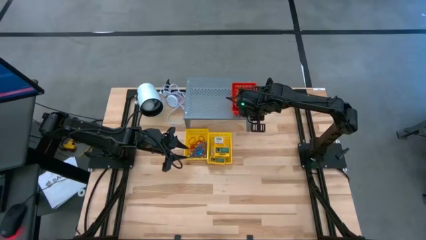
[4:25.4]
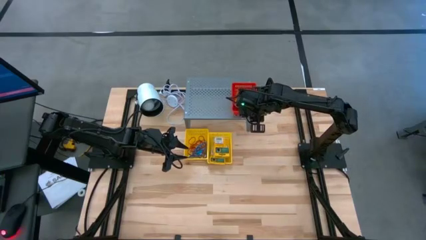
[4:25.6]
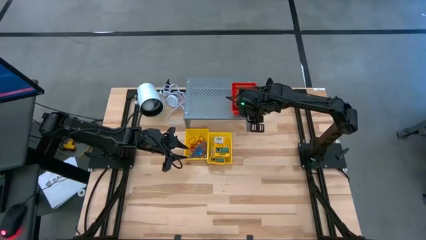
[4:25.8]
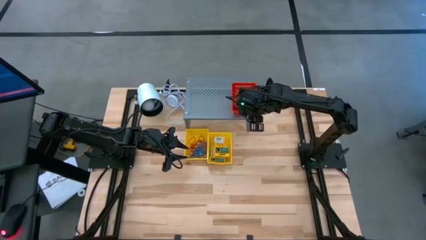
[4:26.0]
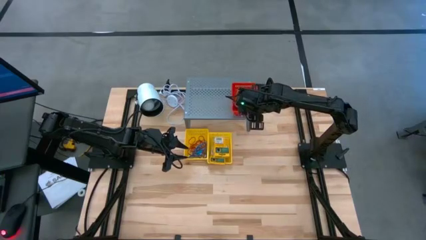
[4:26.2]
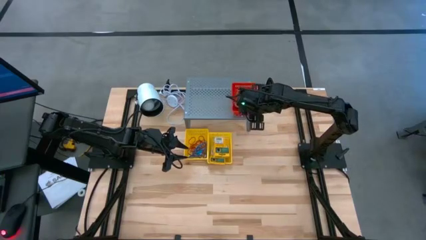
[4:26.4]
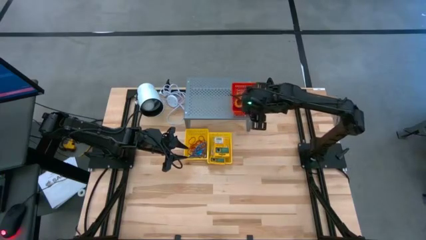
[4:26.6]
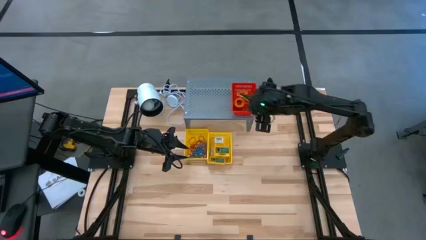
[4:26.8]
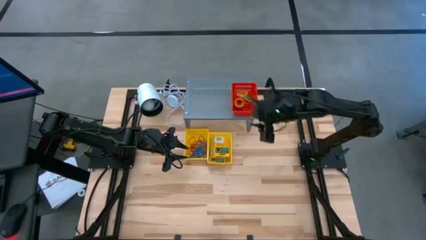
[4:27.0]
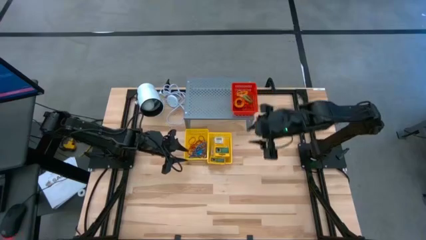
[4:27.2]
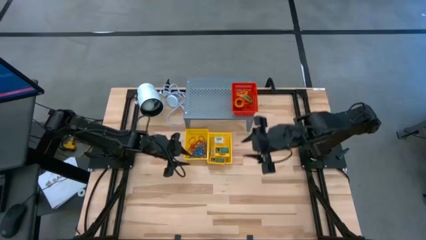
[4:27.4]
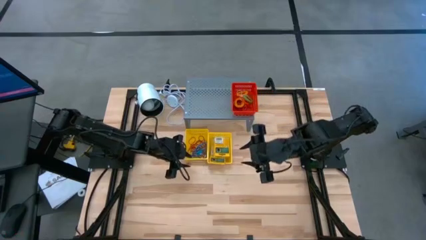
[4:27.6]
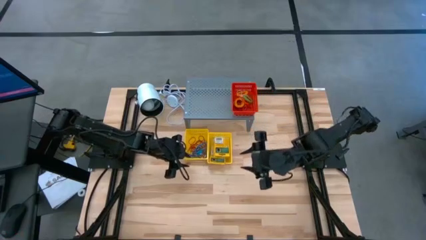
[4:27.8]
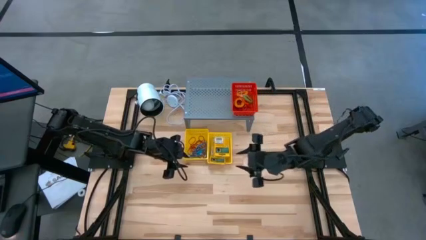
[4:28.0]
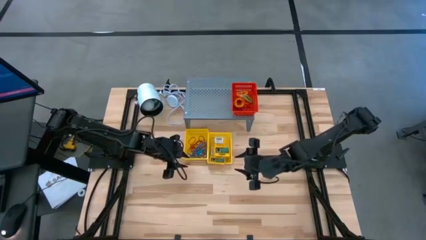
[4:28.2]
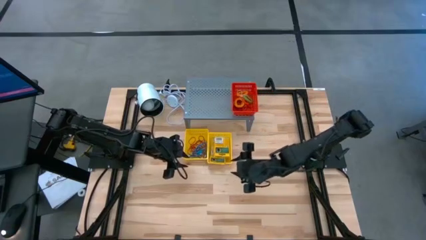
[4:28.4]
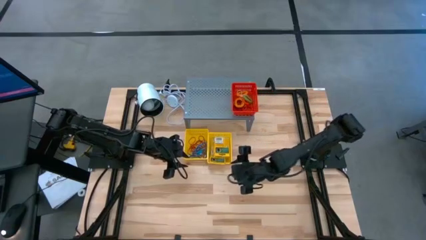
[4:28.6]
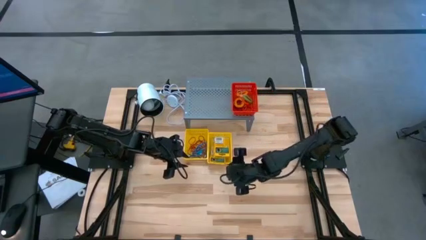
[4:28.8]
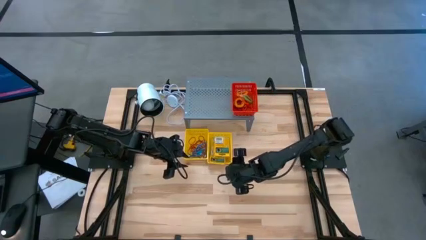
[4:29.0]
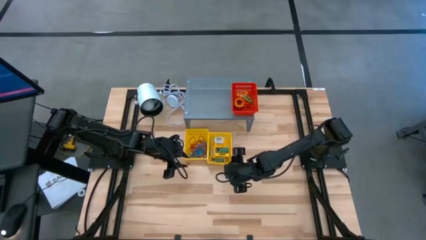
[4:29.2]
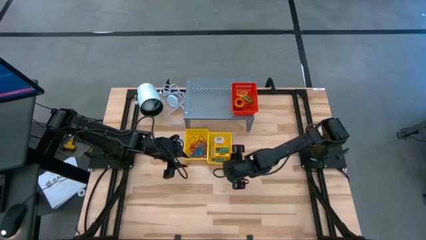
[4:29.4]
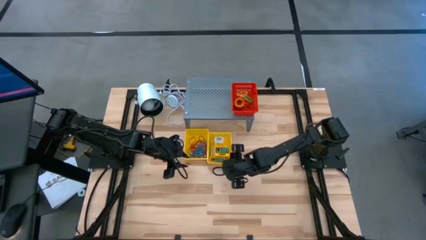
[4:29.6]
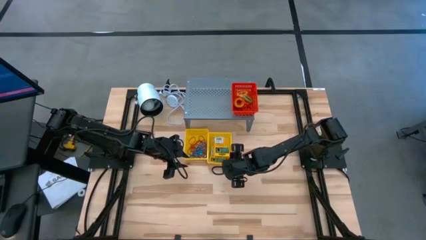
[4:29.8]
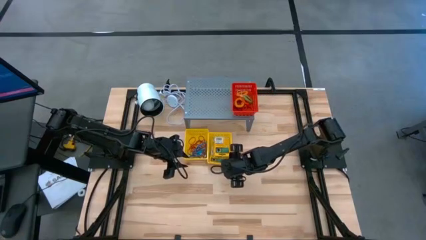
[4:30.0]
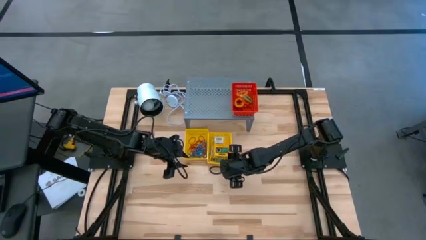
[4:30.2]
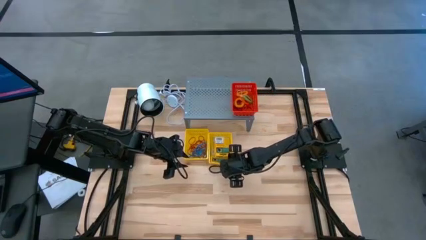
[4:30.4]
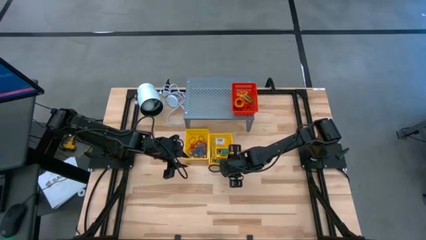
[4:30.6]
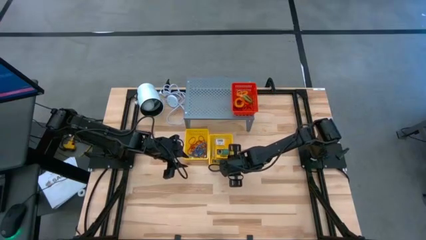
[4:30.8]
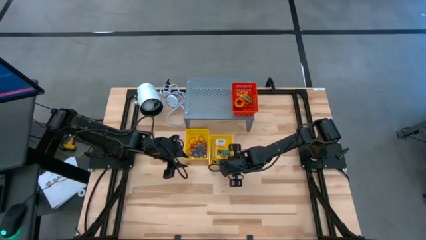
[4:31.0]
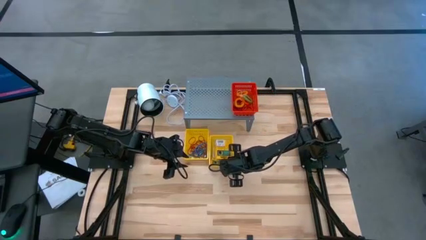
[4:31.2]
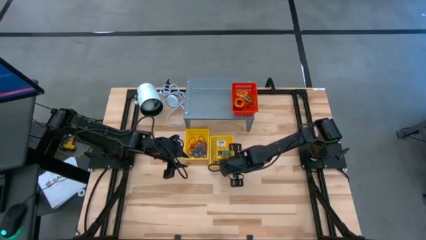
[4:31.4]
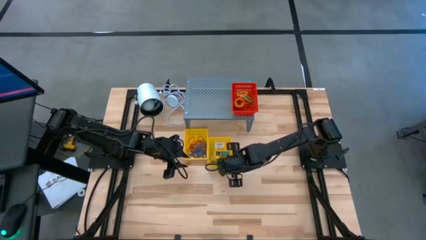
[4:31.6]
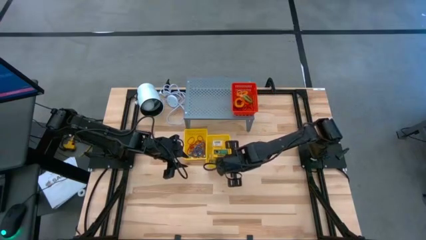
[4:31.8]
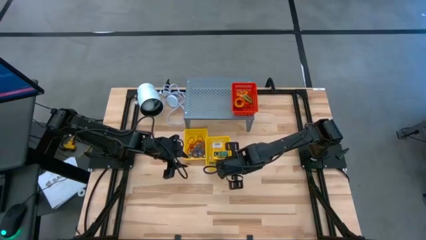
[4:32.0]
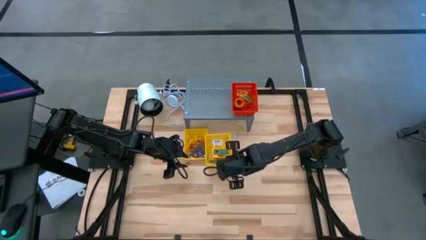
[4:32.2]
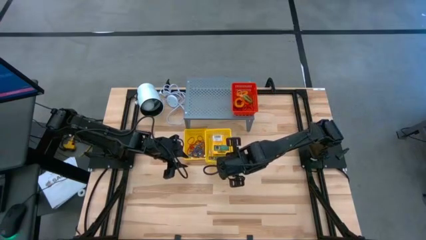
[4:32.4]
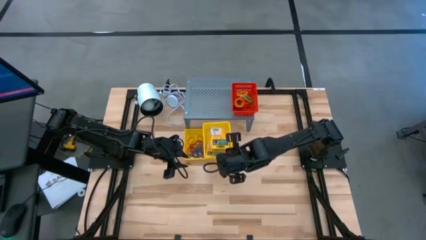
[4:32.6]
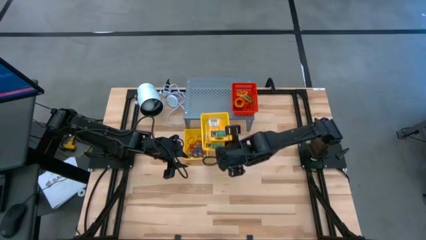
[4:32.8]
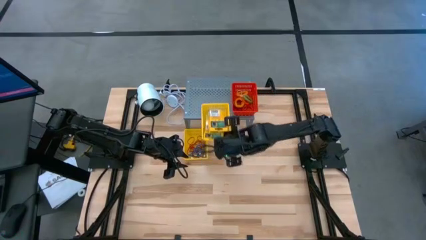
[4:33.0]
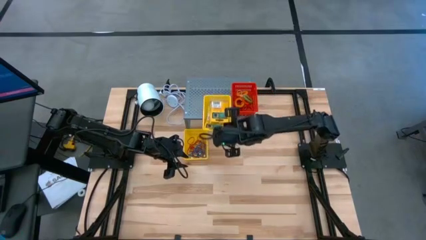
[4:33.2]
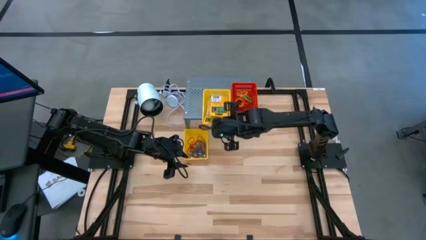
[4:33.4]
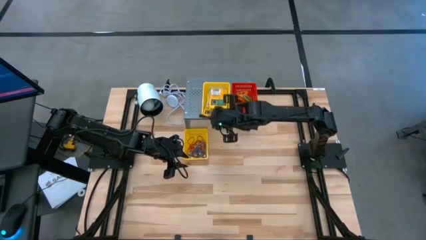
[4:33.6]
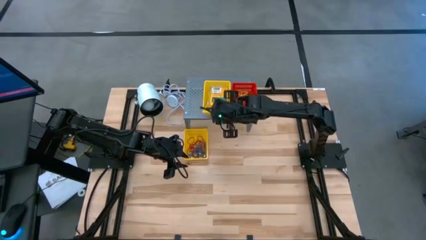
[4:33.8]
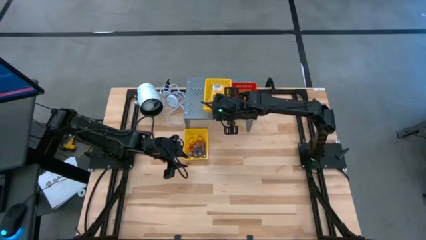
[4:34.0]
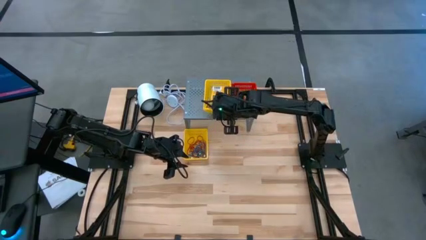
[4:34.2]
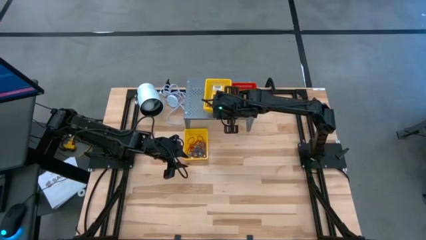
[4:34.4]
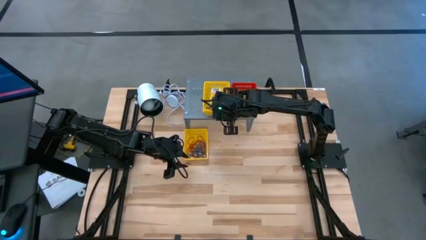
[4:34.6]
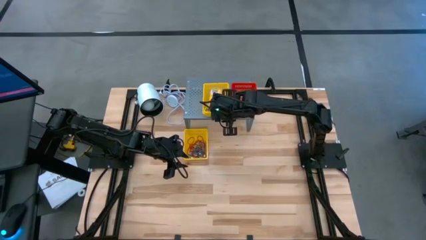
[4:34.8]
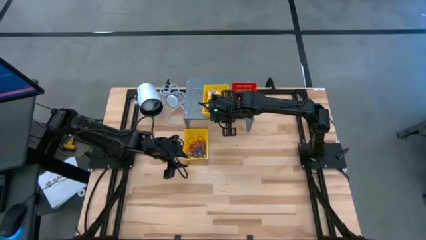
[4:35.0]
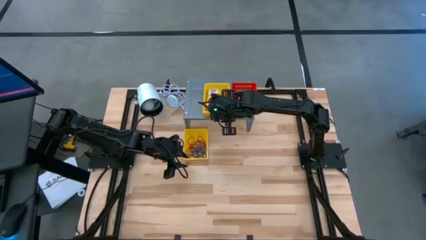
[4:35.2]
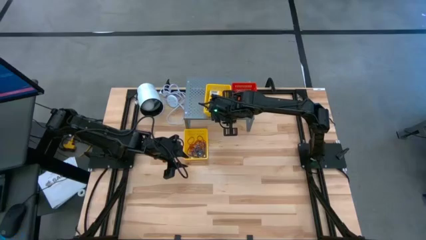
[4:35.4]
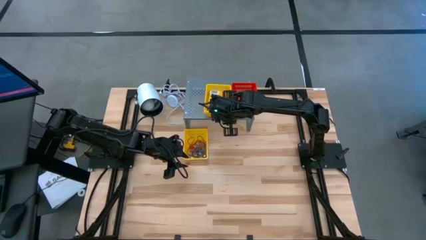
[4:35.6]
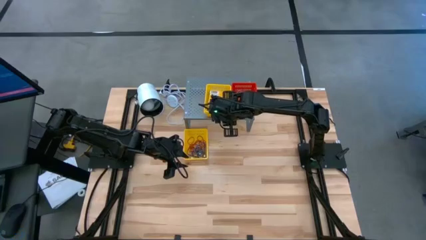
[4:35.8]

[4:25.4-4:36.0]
Task: Pick & Place Office Desk Supplies
Put the right yellow basket with crayon boxes on the shelf

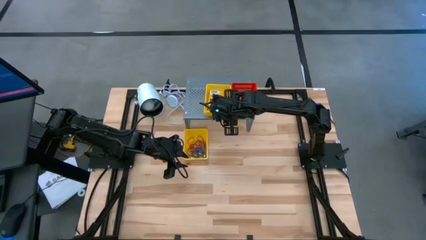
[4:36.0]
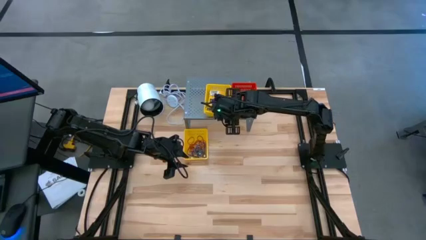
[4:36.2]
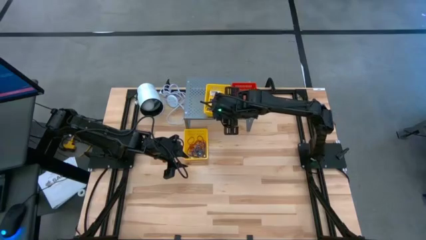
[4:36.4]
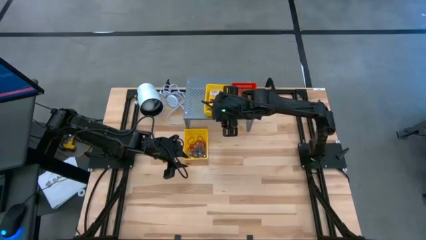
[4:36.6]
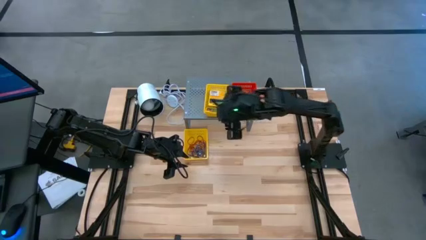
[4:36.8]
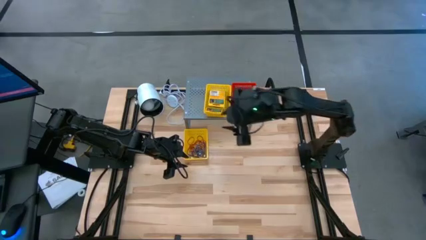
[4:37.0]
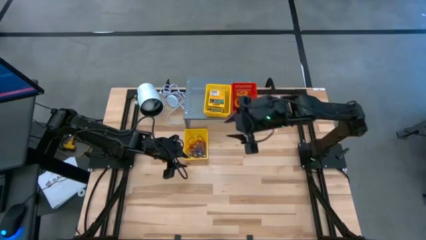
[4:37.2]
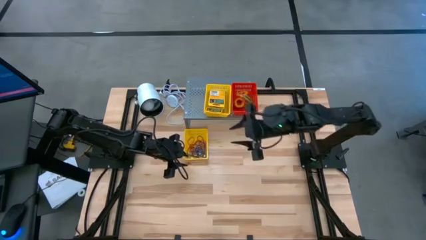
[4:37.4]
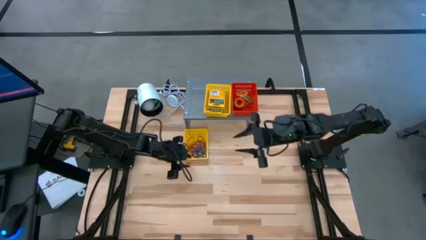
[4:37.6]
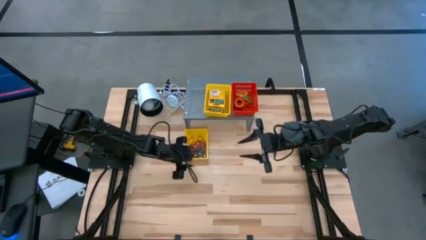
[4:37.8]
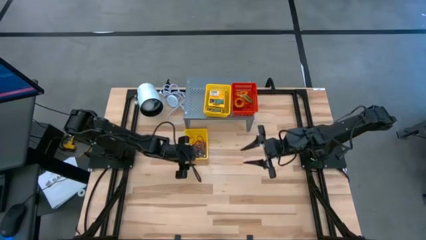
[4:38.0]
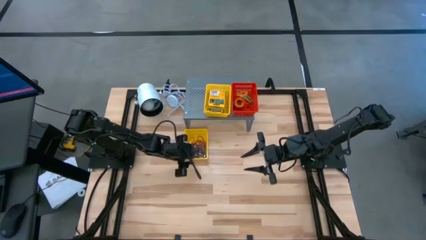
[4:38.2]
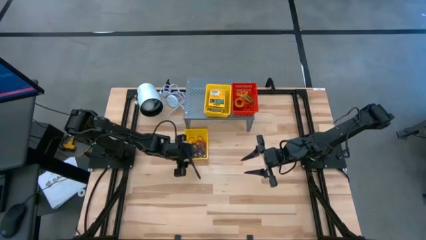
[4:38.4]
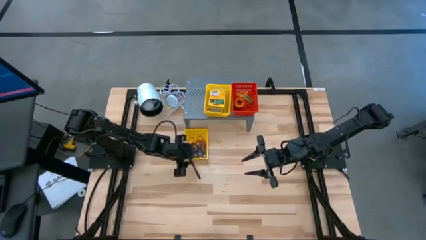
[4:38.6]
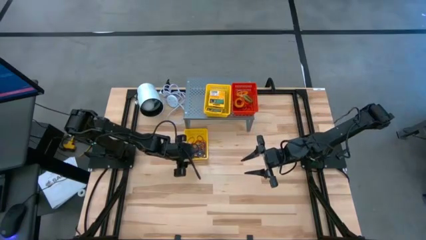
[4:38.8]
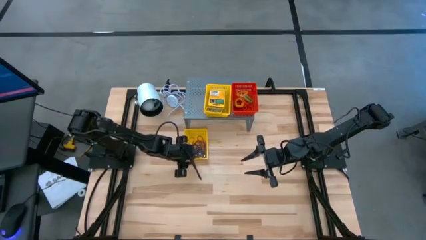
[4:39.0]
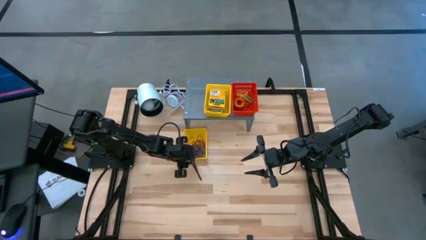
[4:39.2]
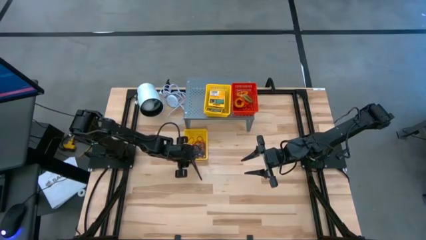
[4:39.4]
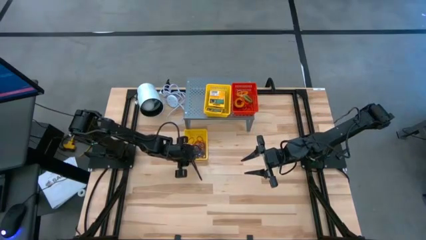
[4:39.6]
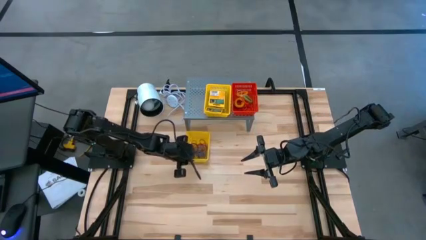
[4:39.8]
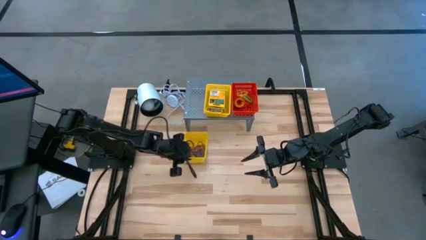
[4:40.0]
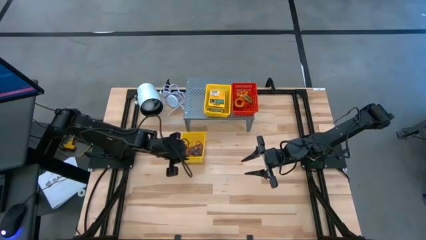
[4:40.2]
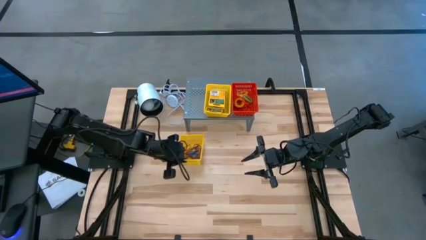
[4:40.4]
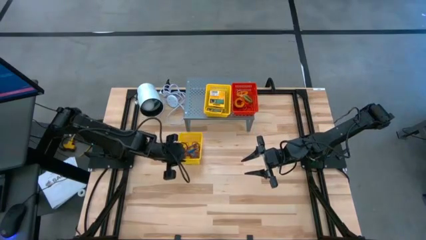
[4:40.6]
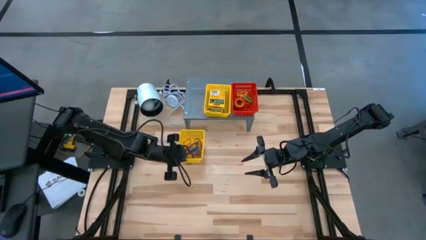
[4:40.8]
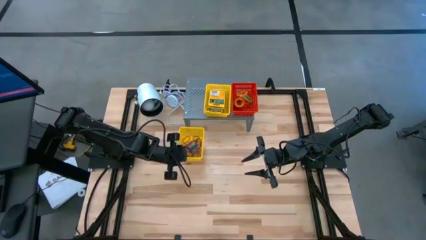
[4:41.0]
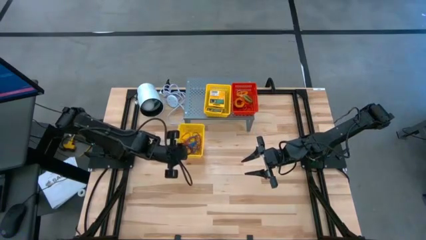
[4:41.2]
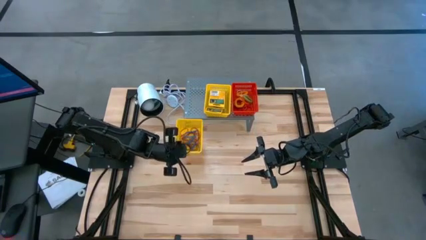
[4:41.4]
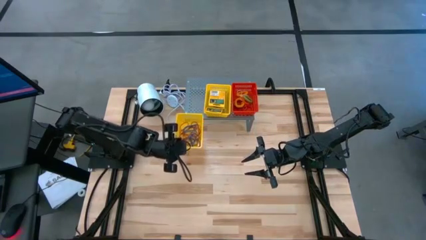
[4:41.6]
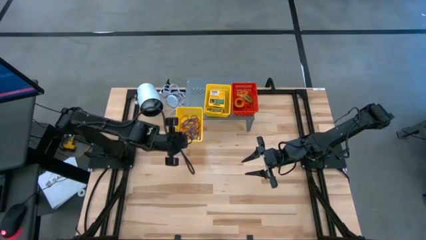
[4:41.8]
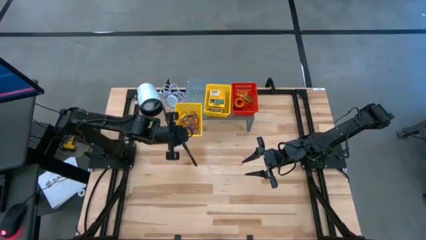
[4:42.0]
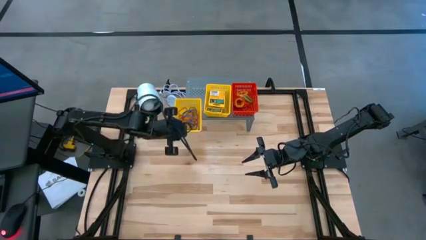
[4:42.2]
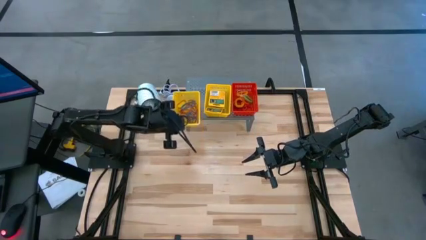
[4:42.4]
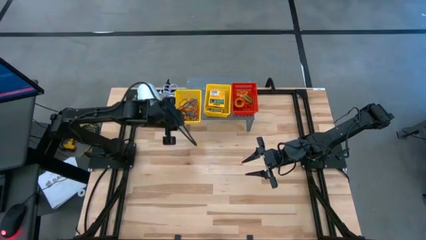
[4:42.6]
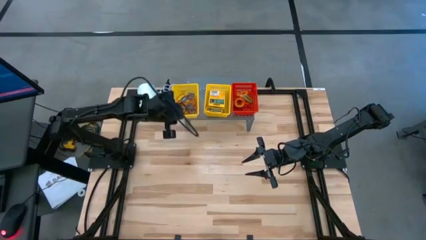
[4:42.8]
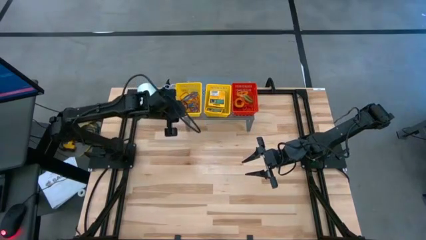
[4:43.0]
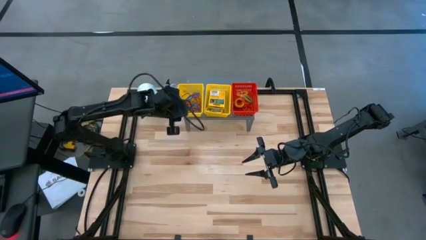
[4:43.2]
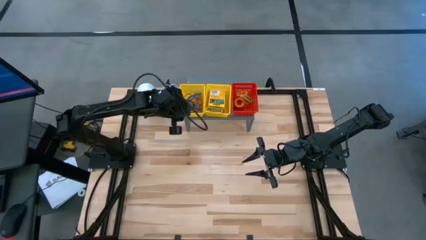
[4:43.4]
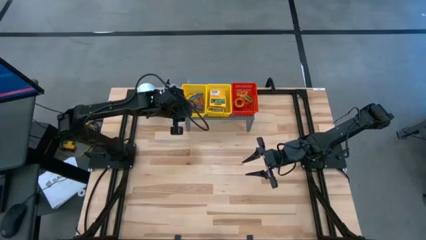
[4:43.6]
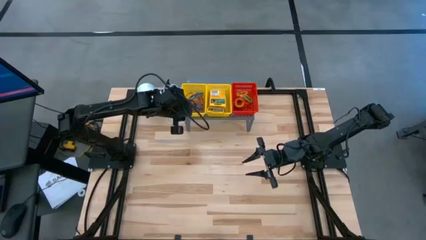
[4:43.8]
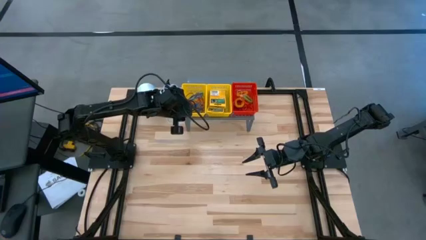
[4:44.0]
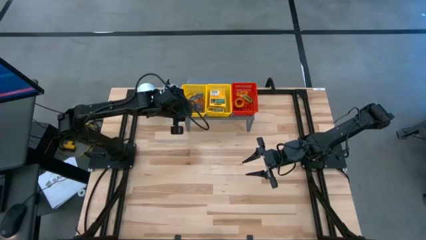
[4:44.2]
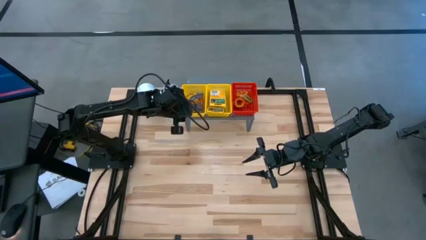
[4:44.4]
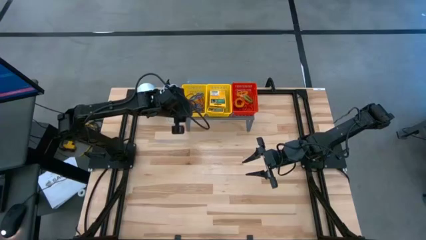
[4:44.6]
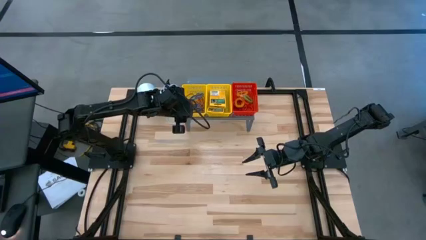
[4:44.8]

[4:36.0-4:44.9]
Put the yellow basket with rubber bands on the shelf
